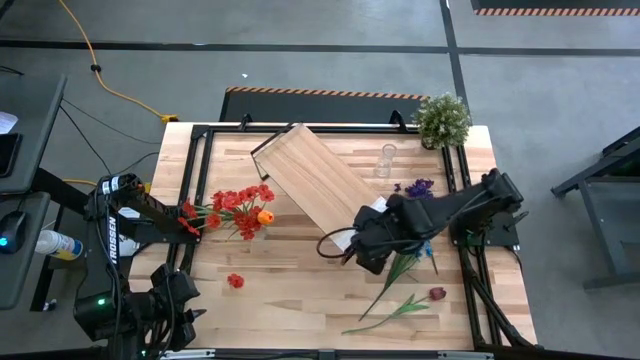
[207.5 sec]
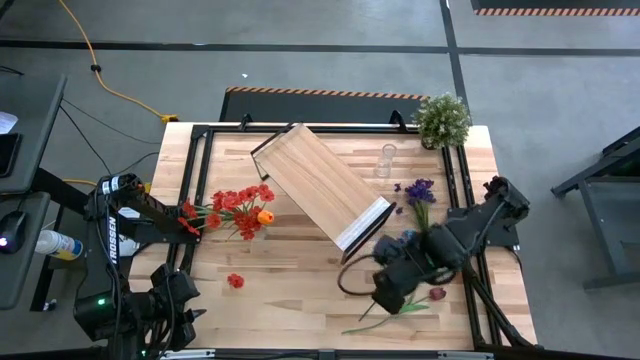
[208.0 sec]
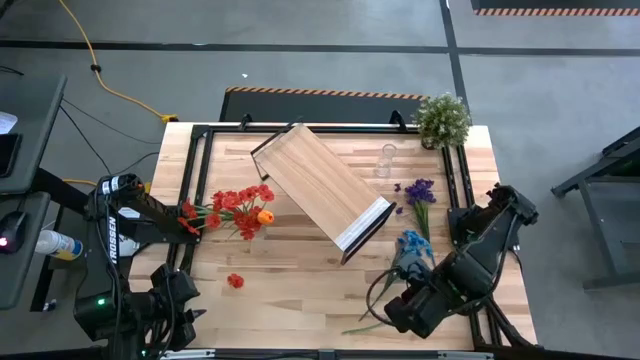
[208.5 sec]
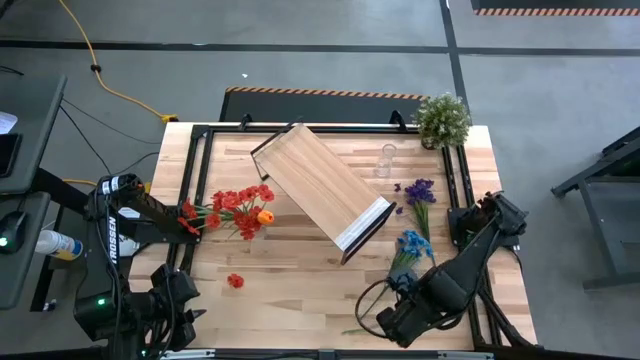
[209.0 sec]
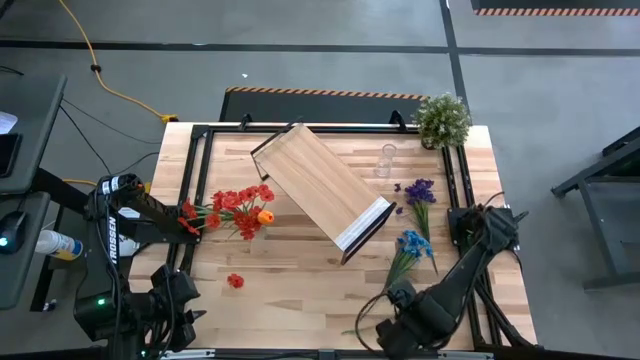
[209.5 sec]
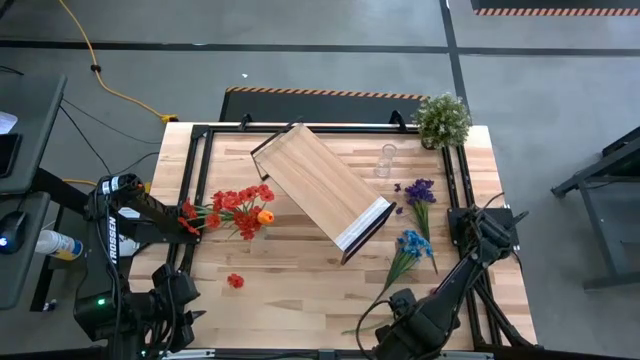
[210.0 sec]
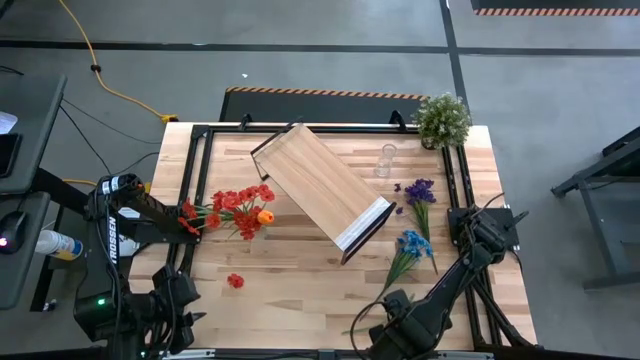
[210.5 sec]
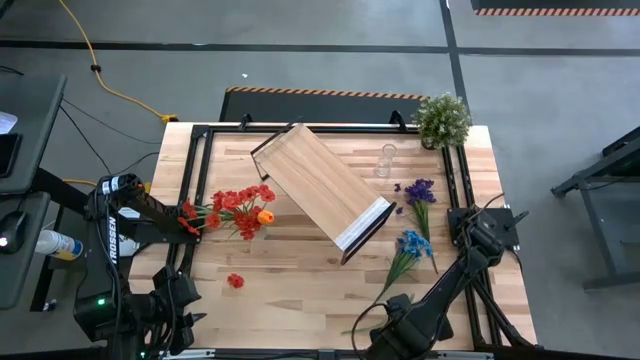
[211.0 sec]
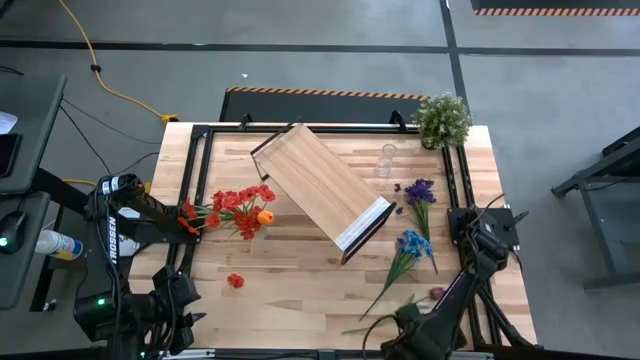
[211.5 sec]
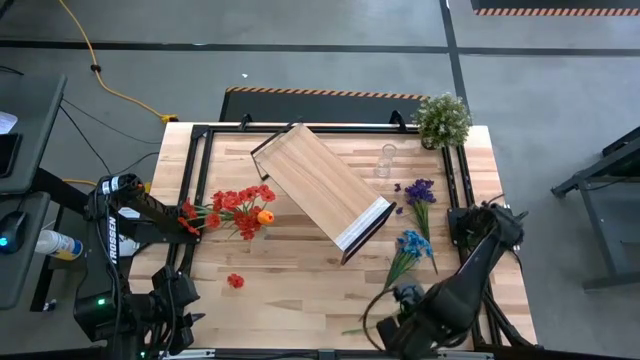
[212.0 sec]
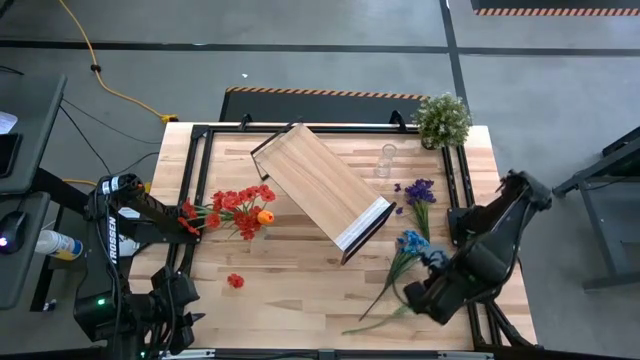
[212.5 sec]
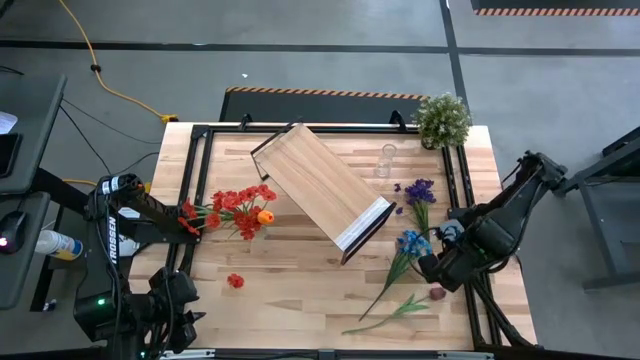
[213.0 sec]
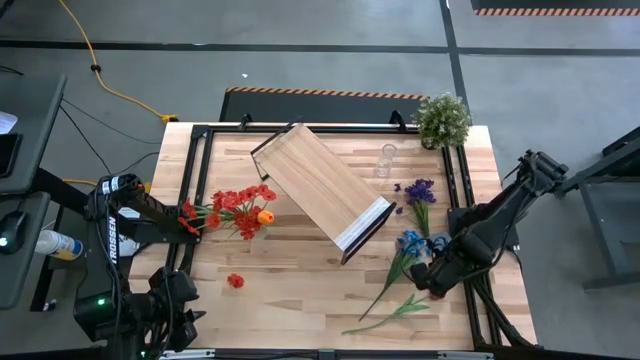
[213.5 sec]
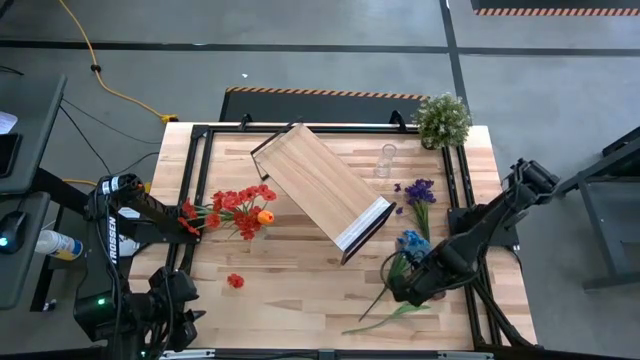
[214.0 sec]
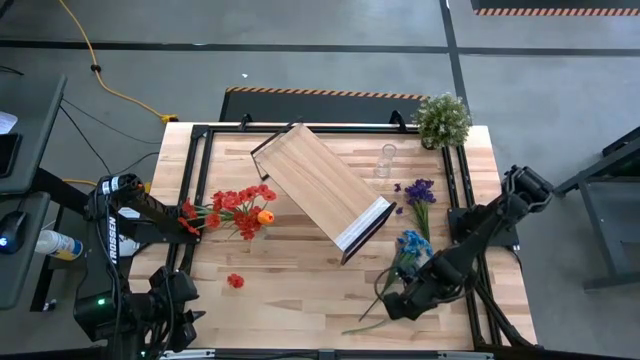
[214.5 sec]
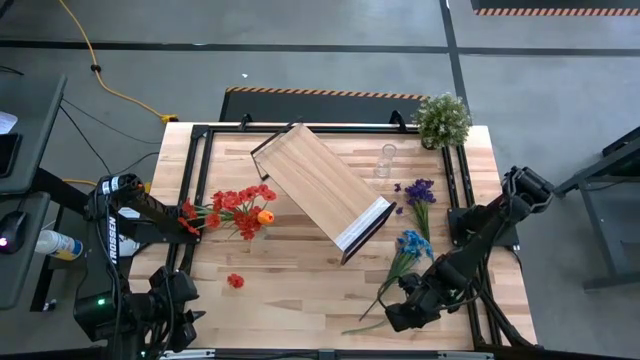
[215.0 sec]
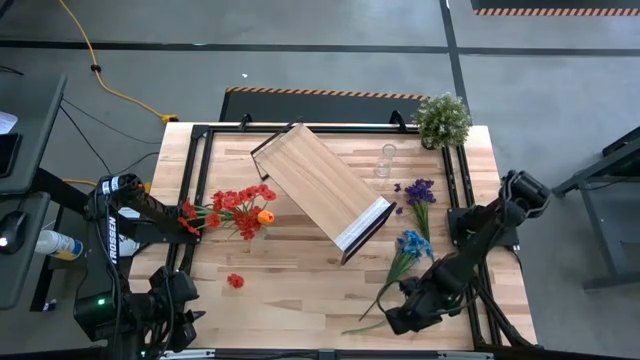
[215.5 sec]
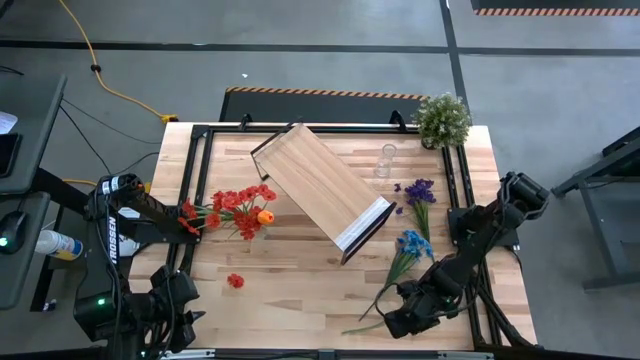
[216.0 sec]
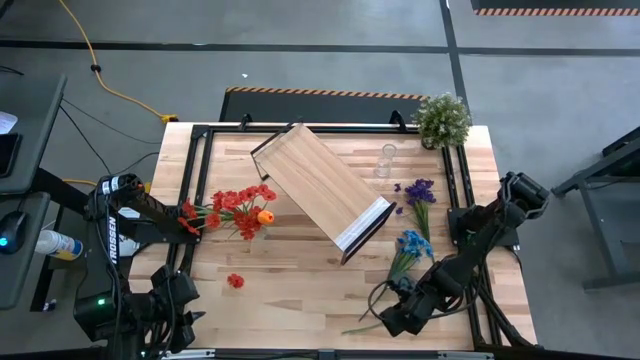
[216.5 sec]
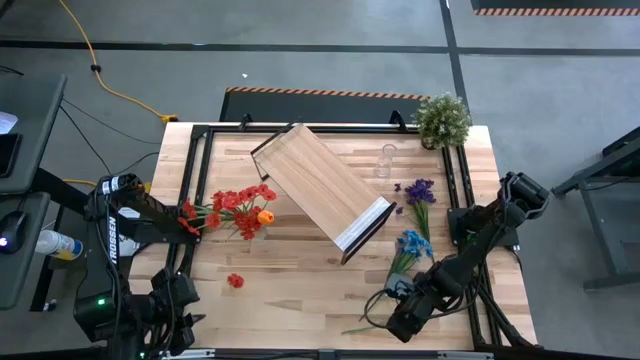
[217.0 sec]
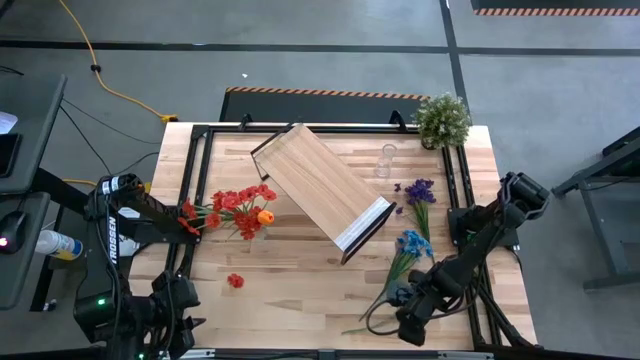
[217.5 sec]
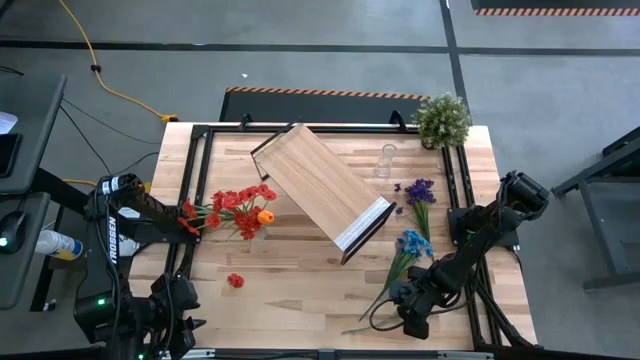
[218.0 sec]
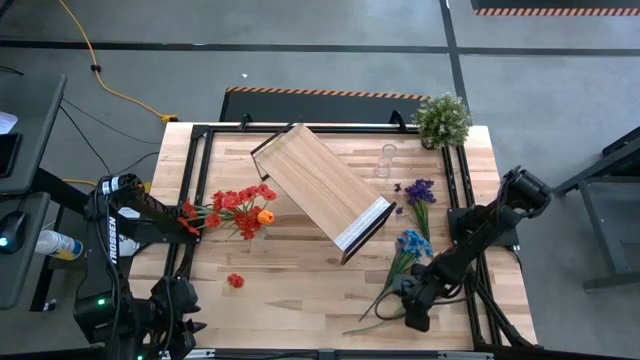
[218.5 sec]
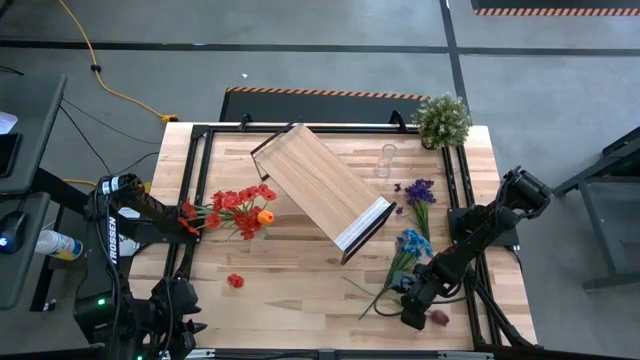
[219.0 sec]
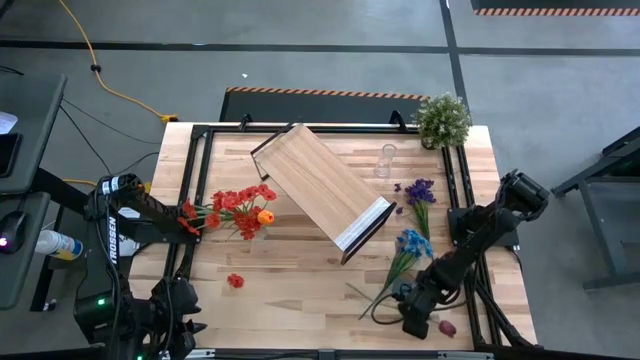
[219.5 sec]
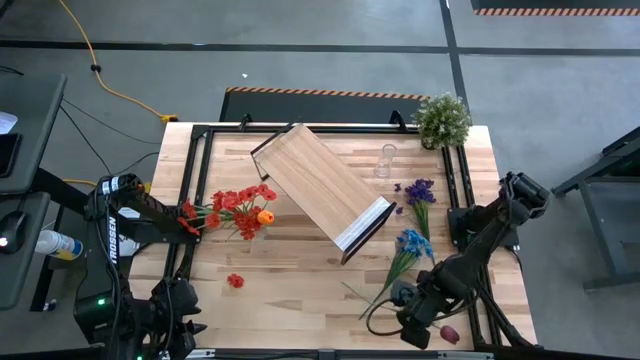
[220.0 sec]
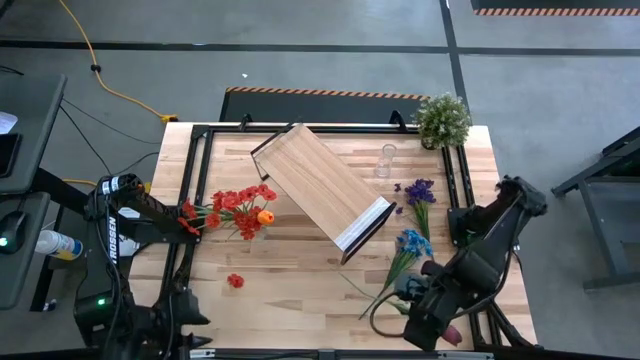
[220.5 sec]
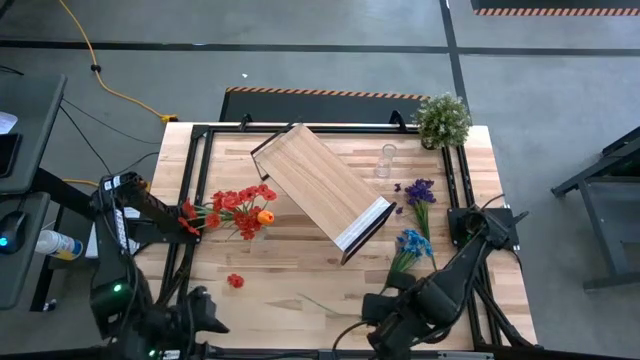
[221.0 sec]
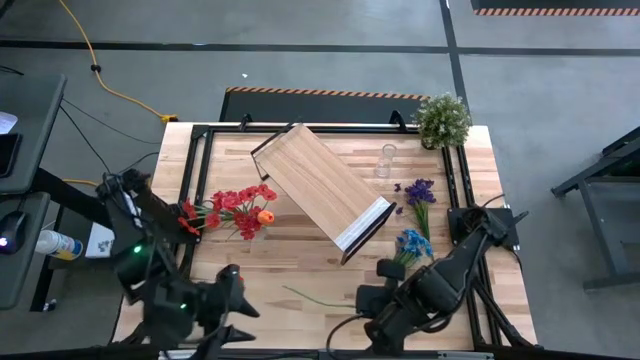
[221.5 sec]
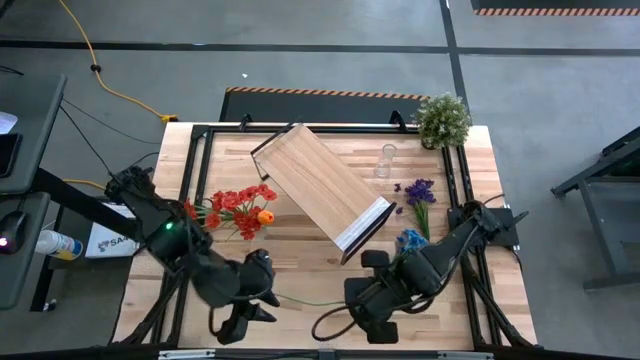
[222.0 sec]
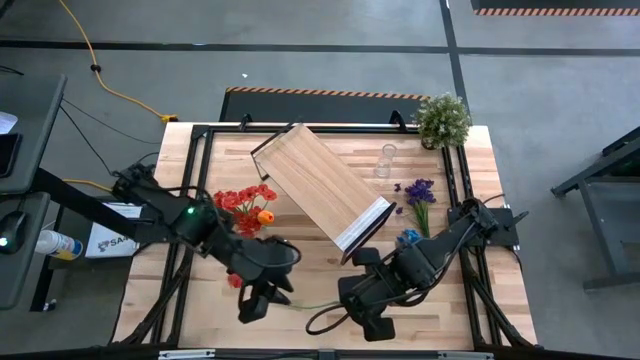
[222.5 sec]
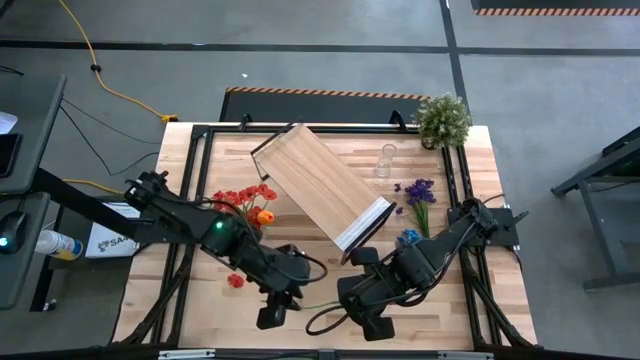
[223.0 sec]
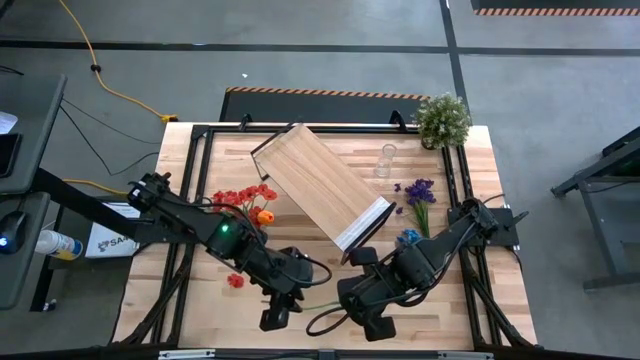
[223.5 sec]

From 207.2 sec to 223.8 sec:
Task: Pick and place flowers into a vace then onto a shelf
Put the red flower into the top transparent vase

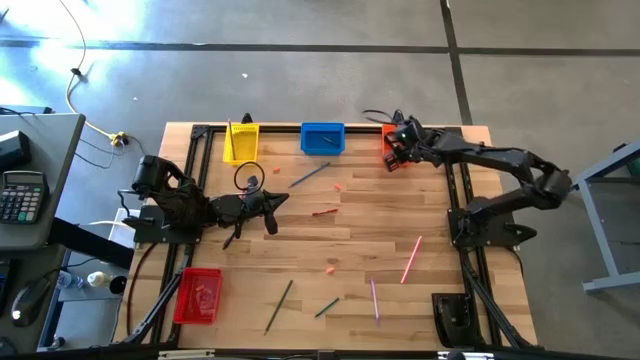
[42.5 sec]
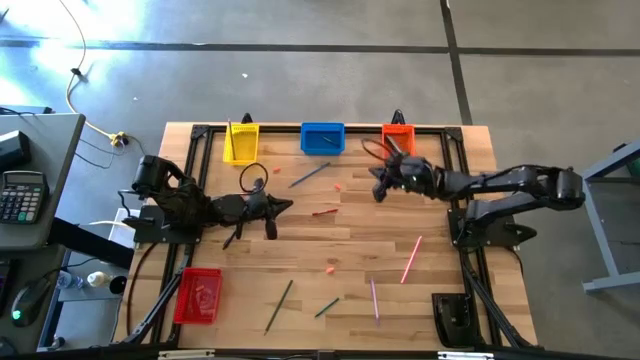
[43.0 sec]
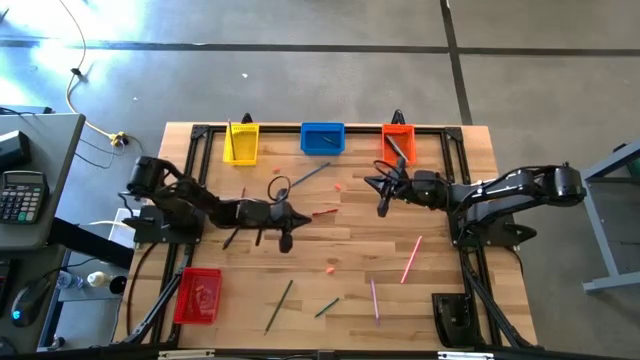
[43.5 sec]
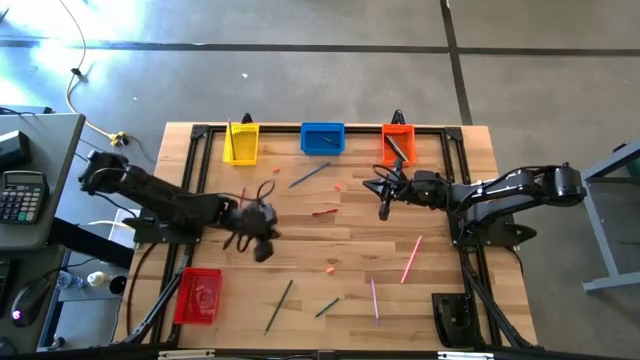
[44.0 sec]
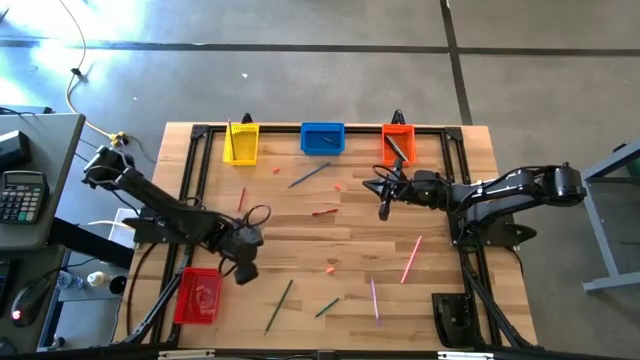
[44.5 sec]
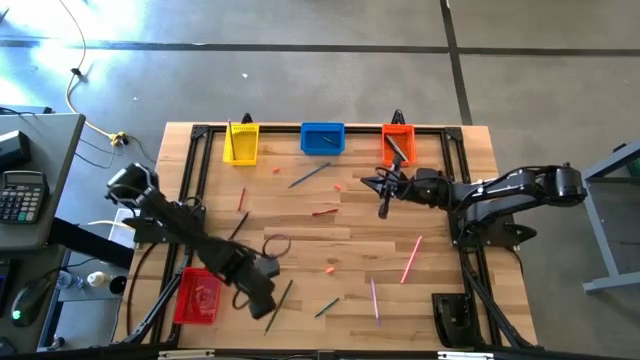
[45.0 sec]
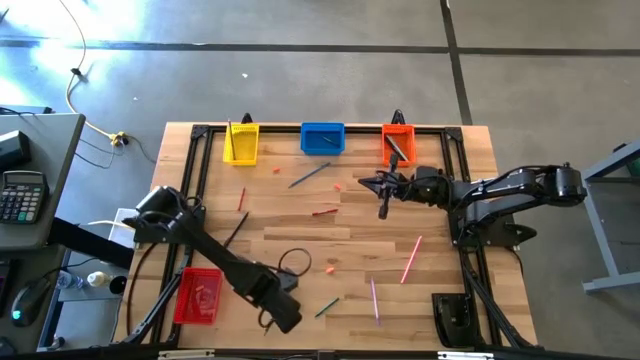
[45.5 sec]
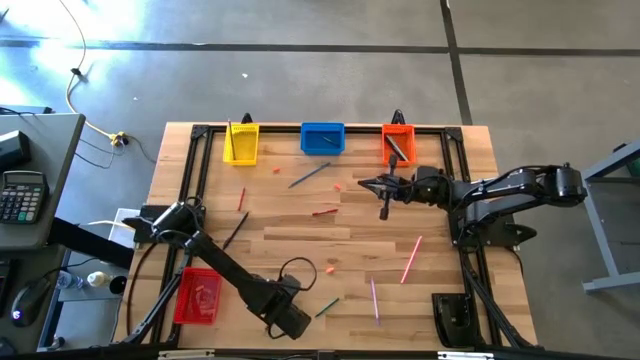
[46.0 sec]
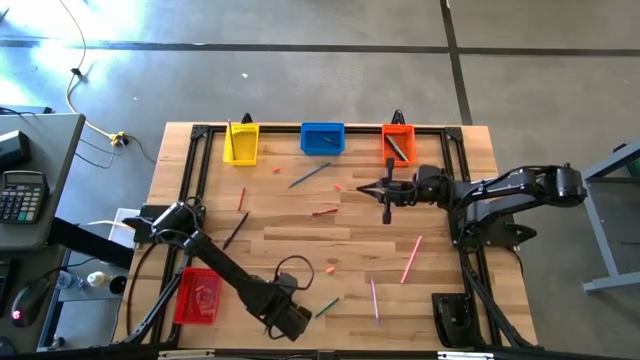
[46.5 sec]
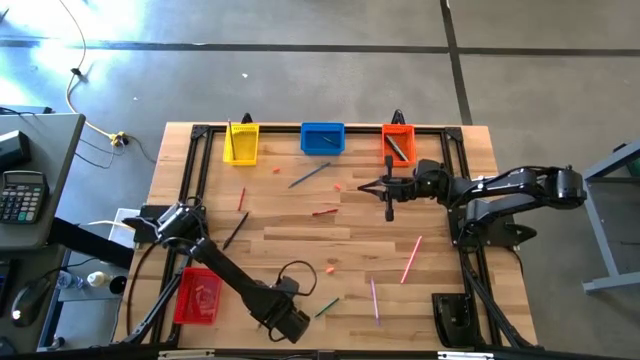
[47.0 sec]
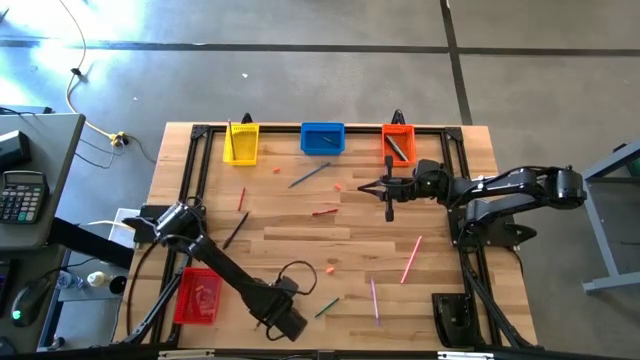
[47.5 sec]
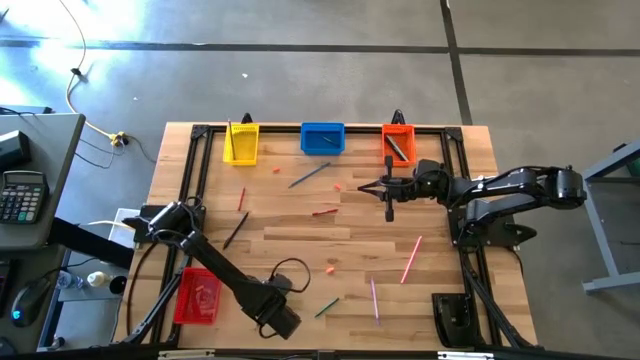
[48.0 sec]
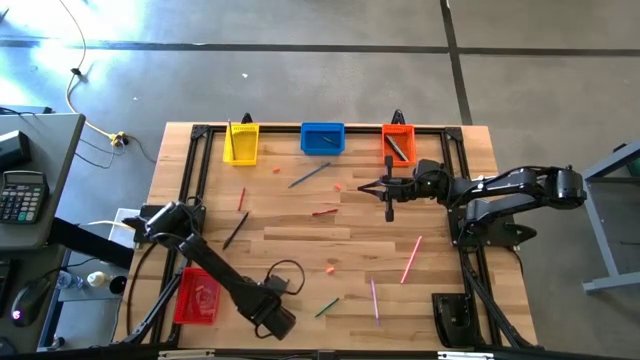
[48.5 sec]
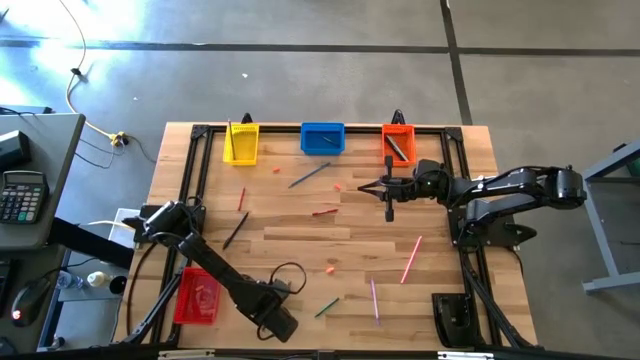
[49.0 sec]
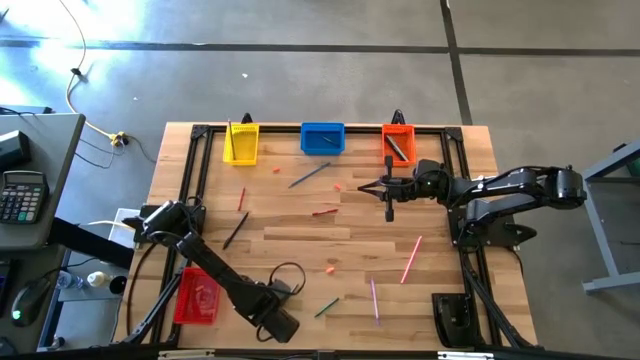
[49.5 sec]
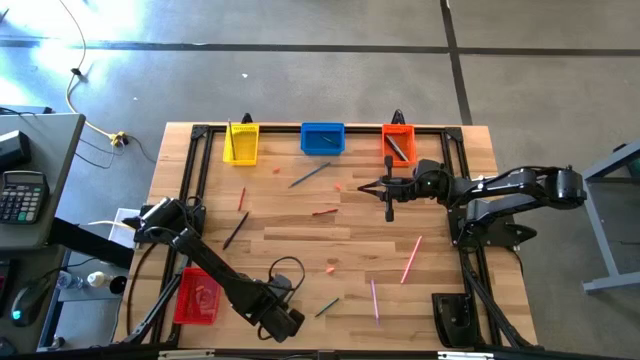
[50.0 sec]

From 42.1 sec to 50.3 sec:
Task: Sort crayons/erasers/pens/pencils in bins
Put the green colored pencil into the yellow bin
